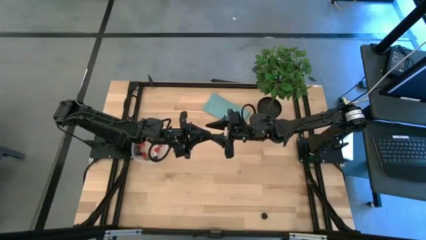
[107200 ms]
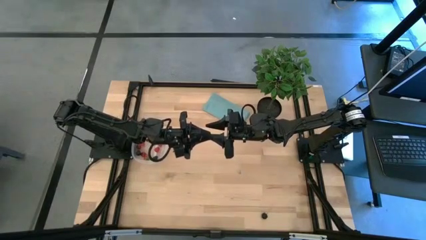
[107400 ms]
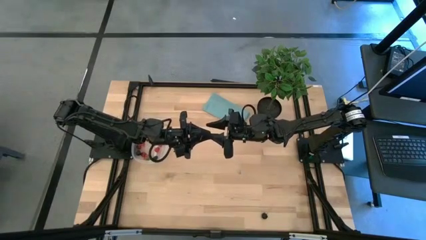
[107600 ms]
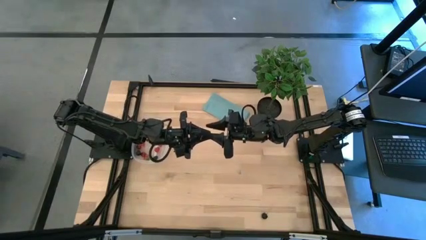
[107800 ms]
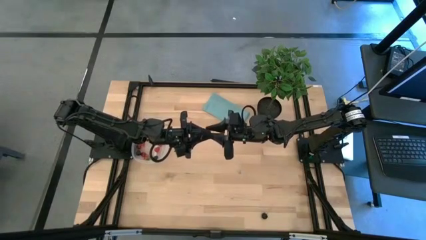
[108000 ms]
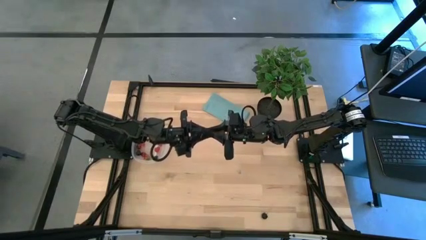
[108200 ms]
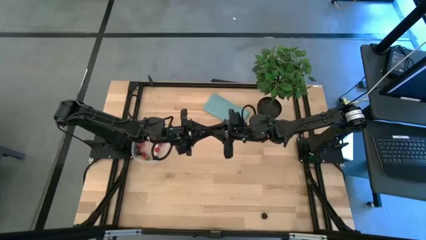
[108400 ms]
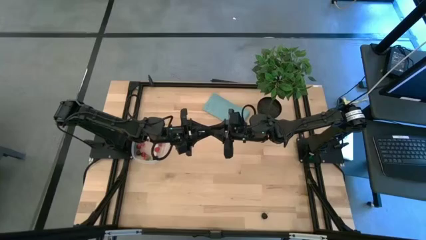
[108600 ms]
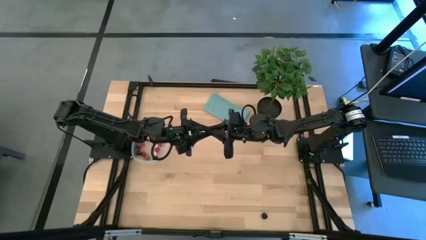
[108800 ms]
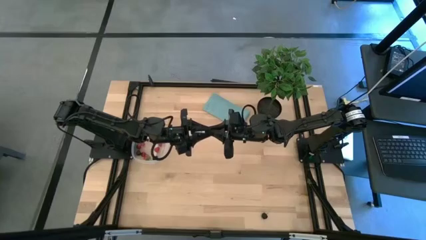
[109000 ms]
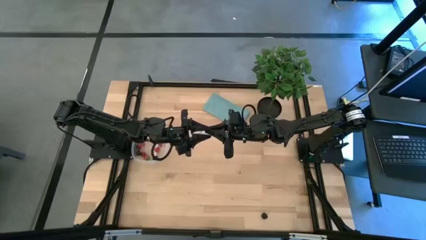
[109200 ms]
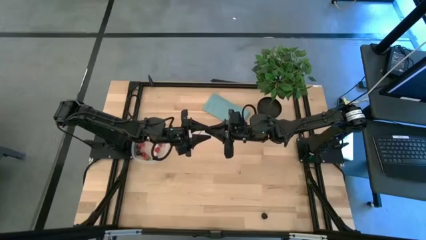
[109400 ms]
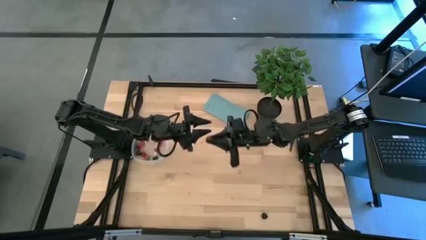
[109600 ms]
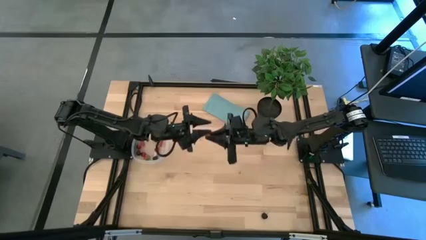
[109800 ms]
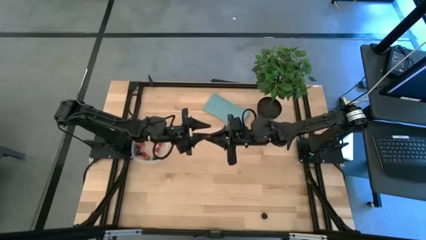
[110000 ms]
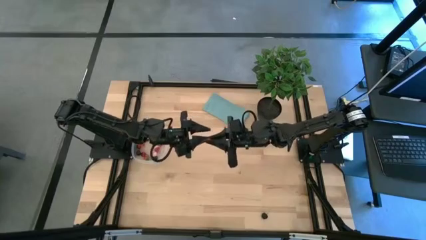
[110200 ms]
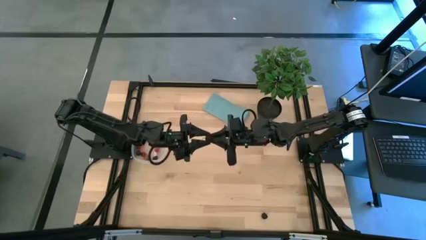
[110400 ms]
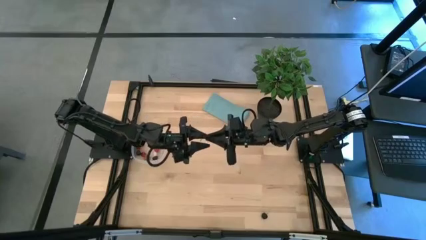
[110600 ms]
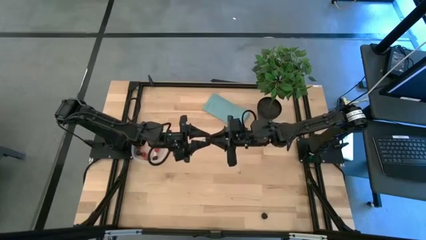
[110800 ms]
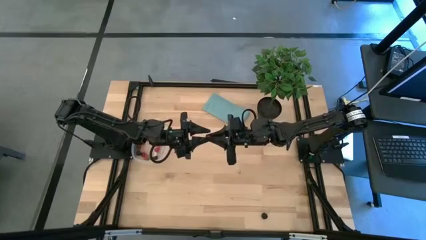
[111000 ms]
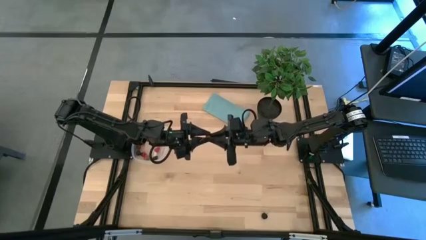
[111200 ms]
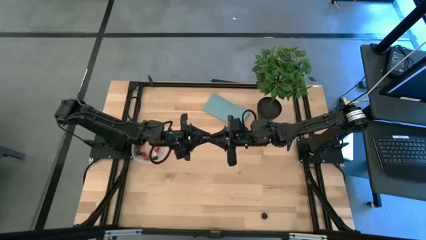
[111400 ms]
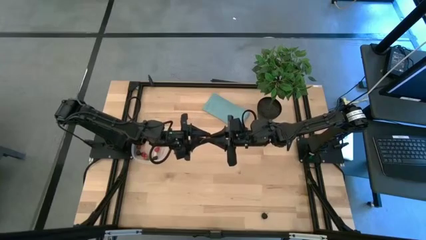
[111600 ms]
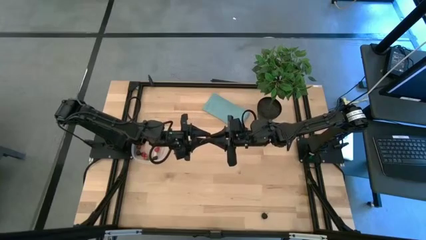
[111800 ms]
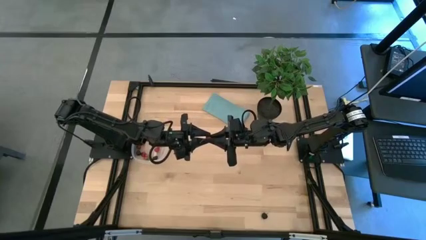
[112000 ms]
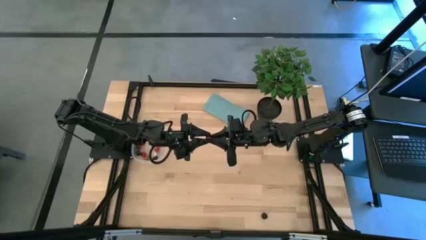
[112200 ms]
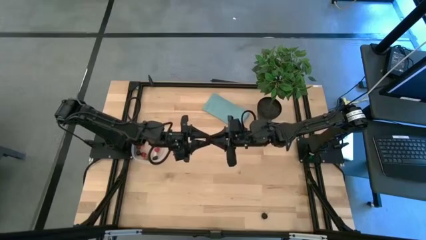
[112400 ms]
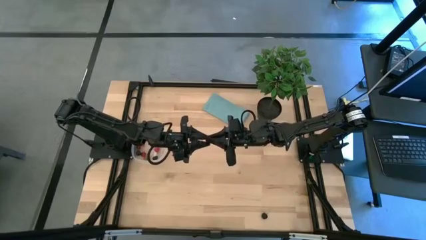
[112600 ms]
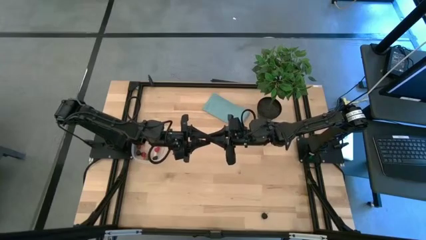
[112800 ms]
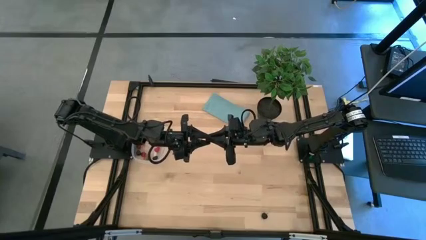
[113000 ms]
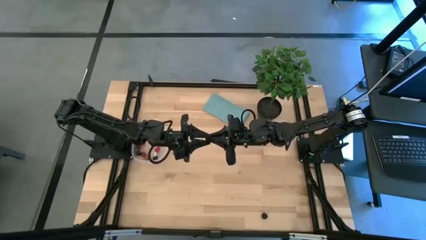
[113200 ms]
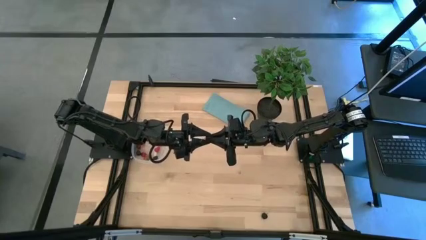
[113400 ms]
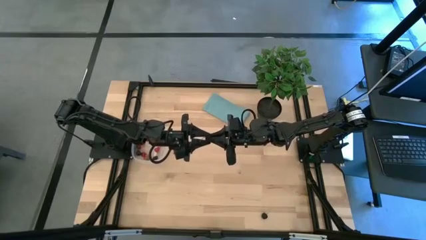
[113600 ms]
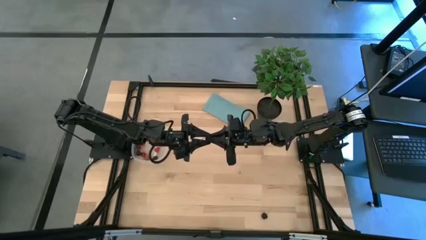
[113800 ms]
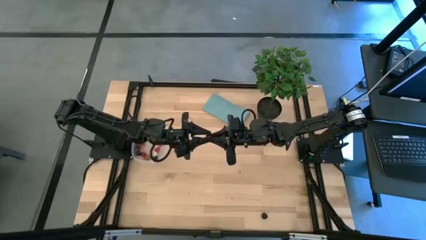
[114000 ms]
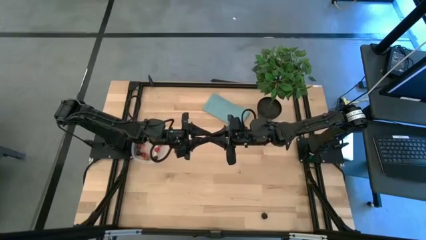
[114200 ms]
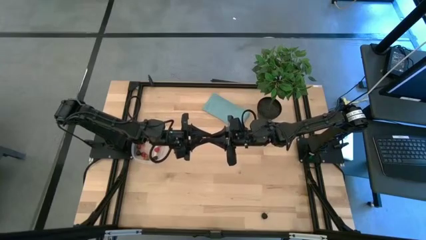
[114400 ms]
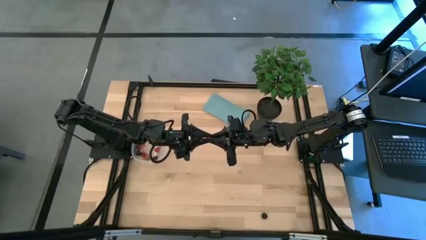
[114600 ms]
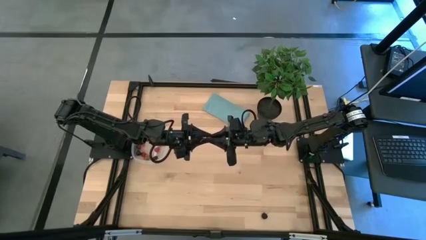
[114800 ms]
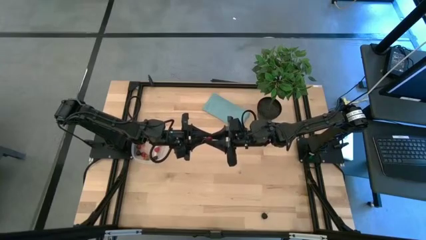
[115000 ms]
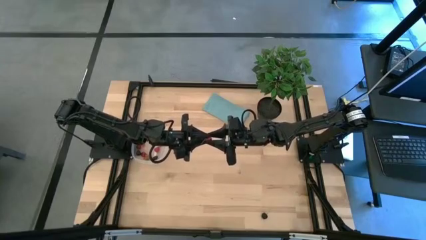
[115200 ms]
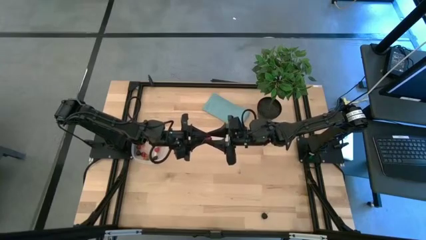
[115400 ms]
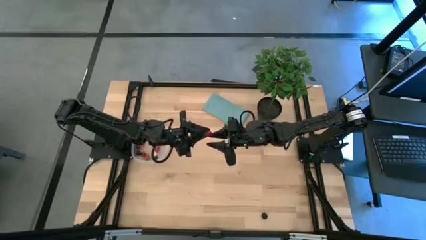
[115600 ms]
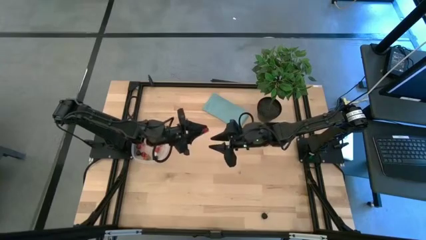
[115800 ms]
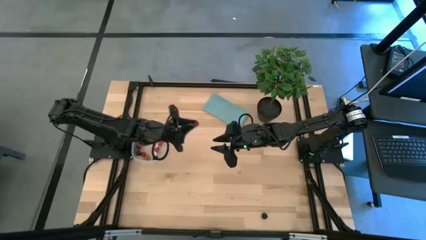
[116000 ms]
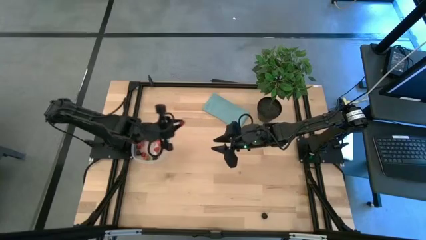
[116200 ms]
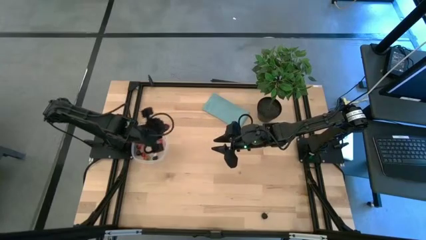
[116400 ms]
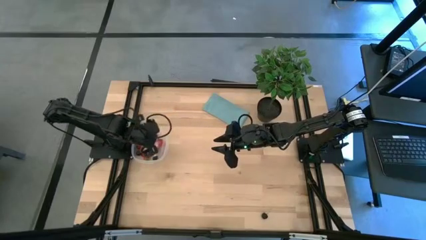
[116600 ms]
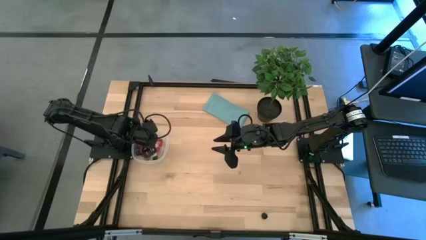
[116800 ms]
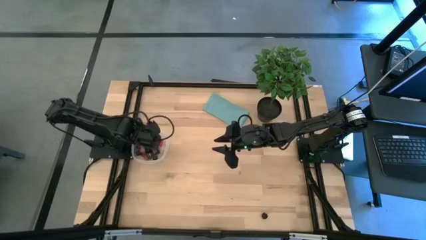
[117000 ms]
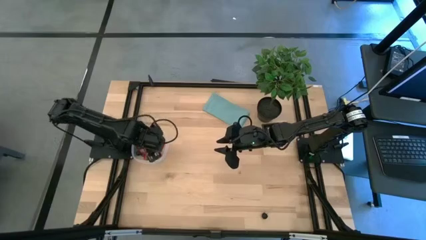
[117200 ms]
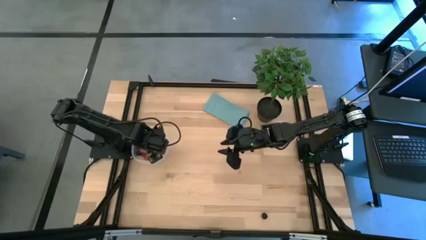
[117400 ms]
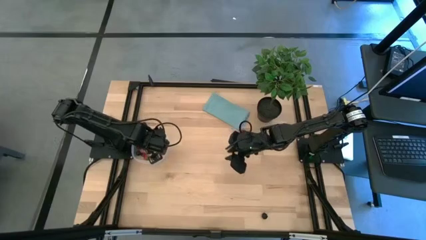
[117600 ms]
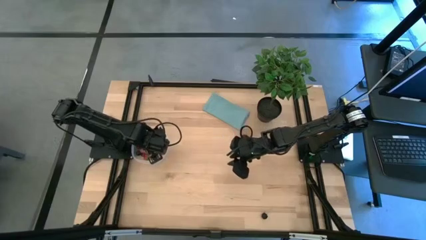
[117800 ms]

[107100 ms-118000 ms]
Task: Pick and placing Produce into tupperware
Put the red cherry into the transparent bin

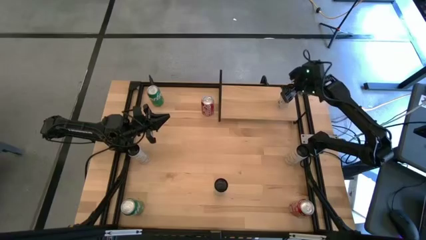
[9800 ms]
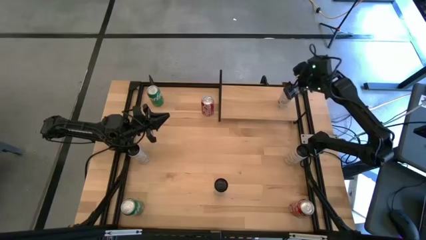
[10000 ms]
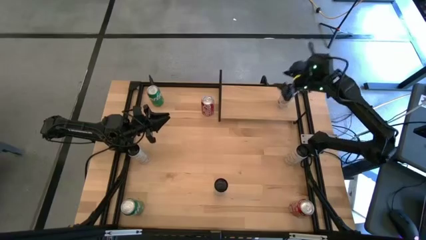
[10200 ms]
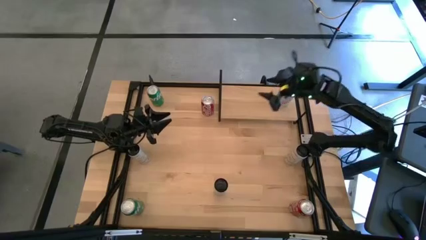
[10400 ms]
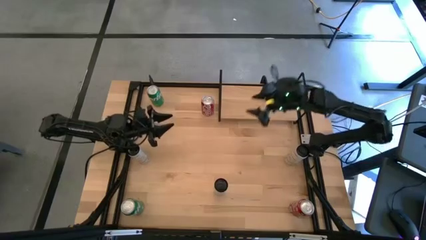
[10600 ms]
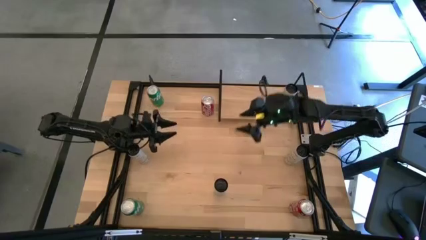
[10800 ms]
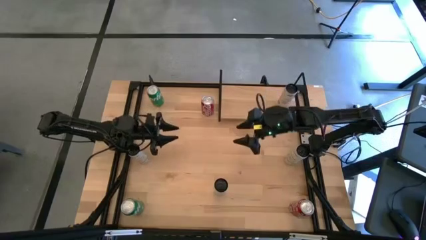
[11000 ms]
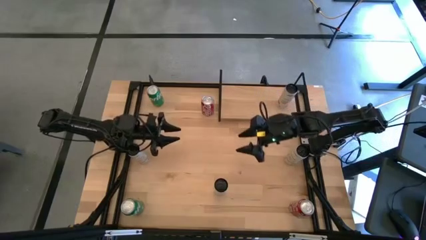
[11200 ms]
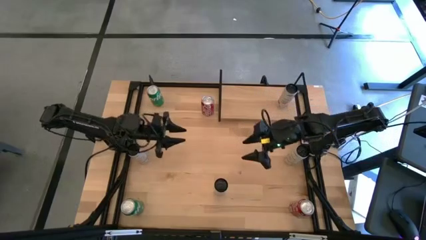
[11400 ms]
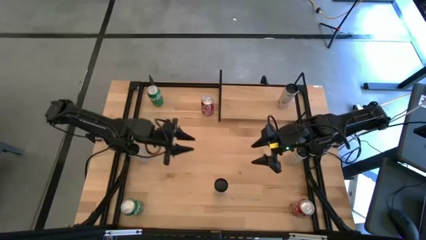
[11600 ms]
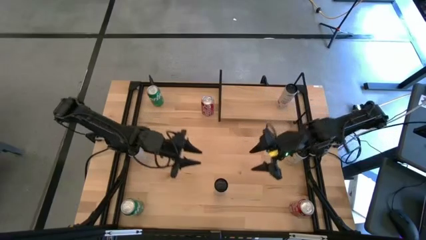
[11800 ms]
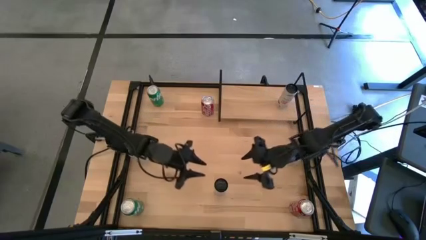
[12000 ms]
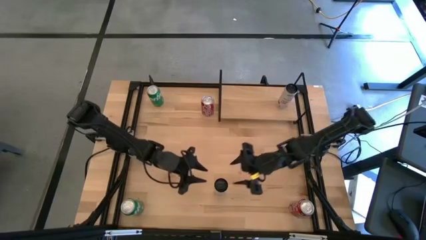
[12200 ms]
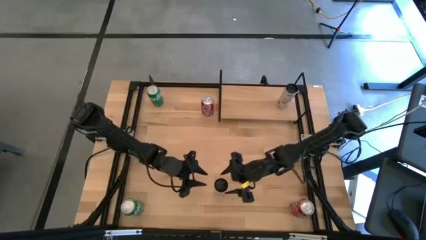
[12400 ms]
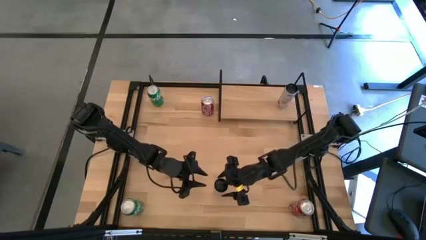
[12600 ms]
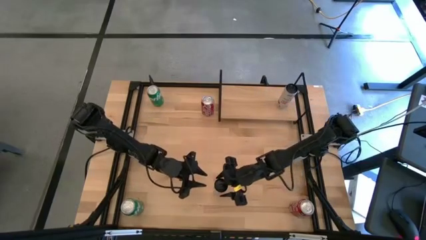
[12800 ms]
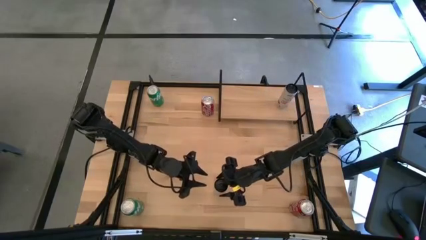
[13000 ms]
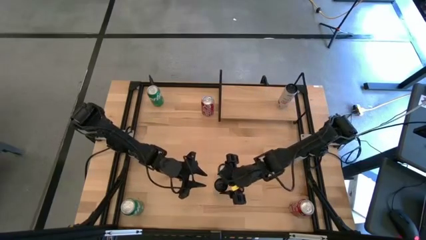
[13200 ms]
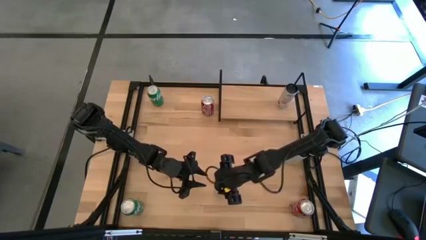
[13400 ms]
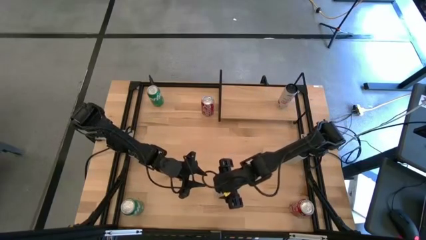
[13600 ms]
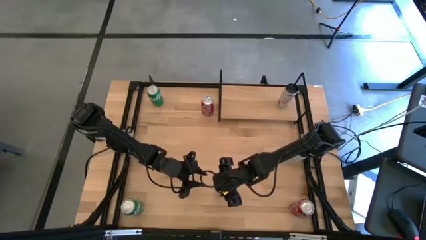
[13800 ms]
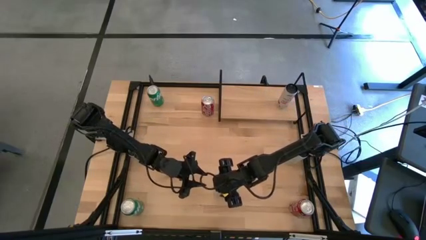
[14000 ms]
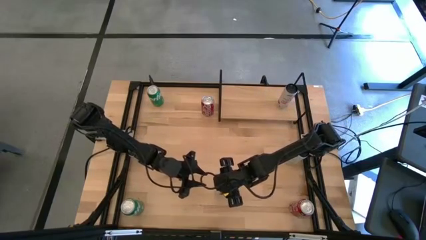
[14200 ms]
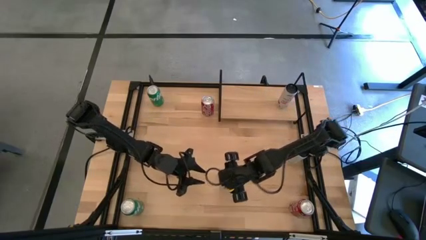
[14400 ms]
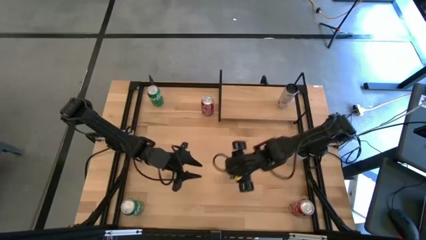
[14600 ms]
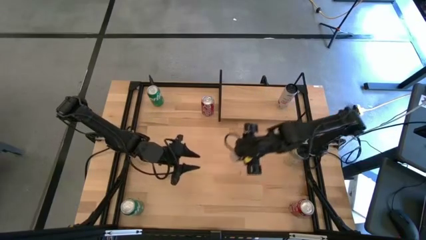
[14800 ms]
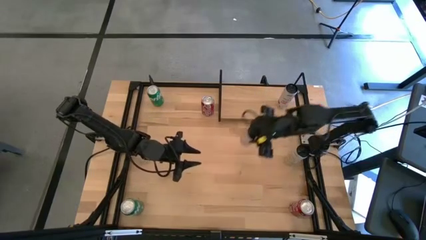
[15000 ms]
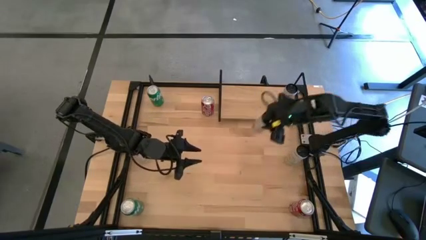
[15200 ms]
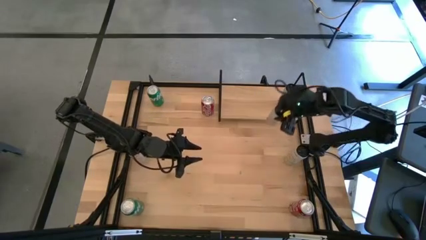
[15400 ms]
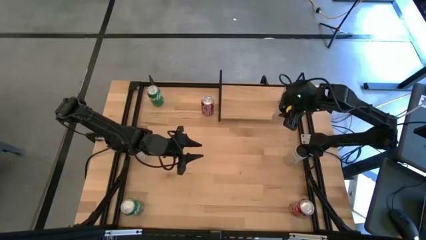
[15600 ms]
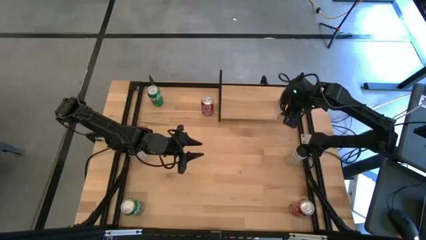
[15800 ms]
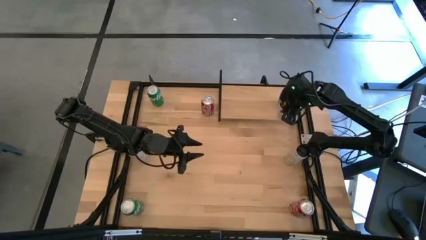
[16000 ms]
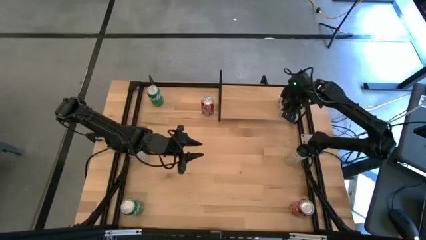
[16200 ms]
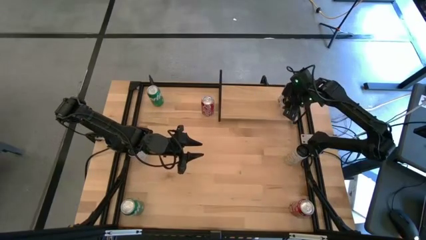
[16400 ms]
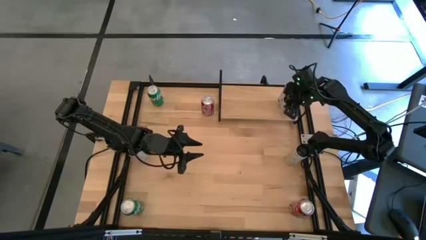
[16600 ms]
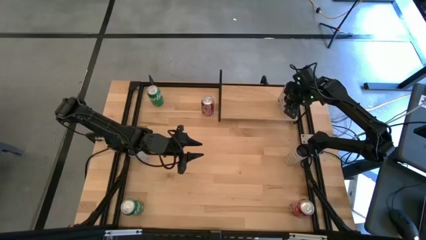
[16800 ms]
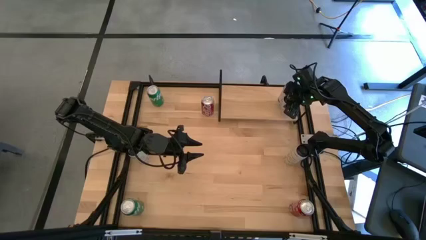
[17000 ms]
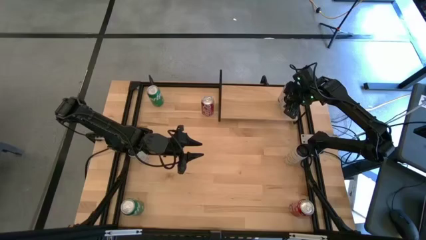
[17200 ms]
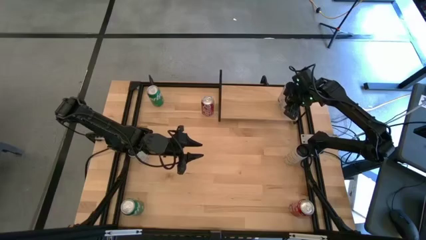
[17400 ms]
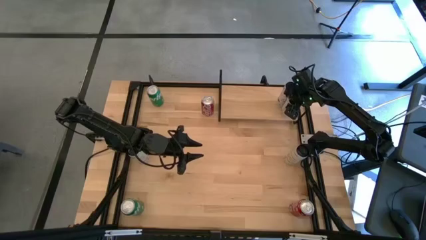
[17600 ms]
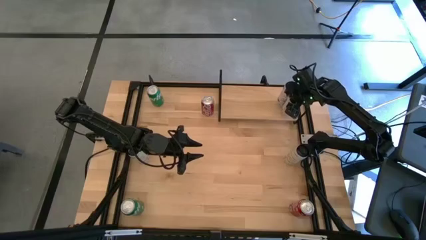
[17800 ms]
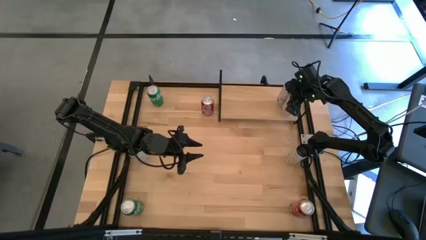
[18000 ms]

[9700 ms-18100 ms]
Task: Place canned beverage on shelf
Put the top white pink soda can on the shelf aligned with the other white pink soda can
